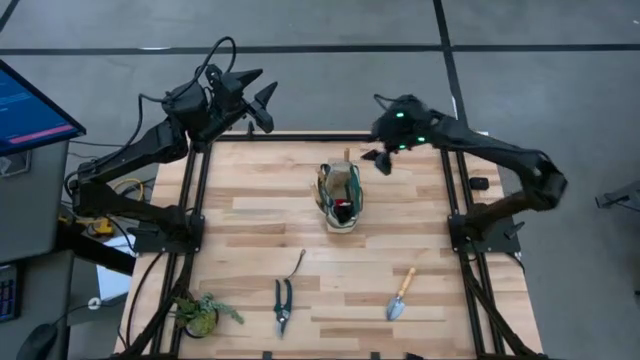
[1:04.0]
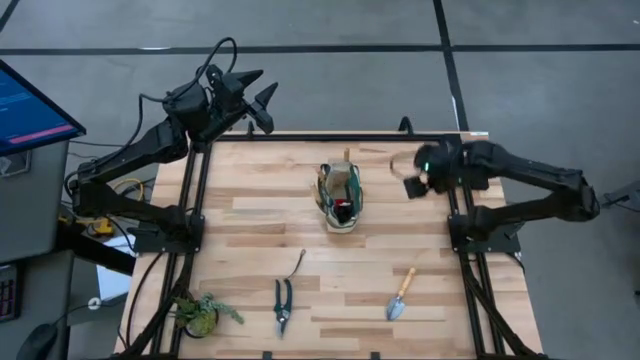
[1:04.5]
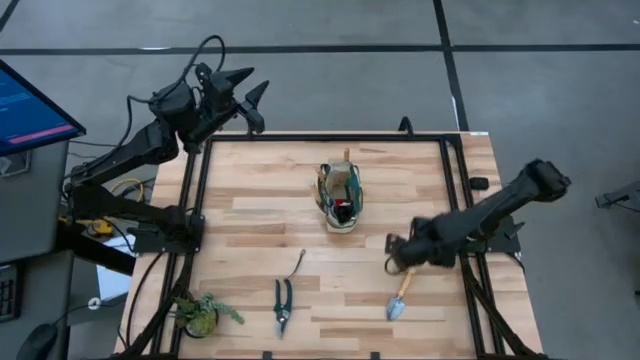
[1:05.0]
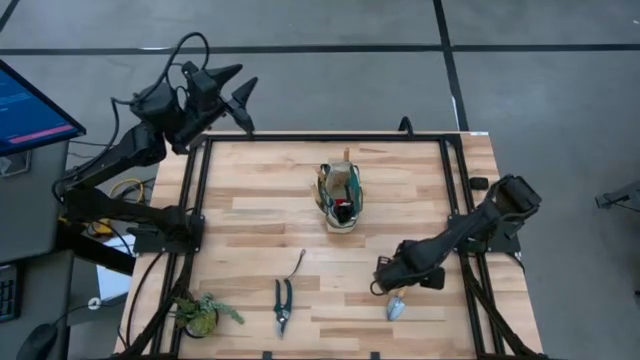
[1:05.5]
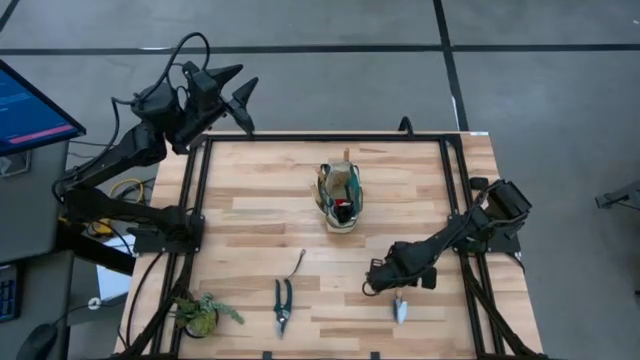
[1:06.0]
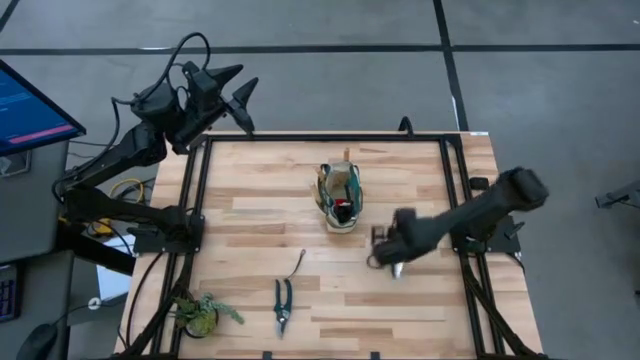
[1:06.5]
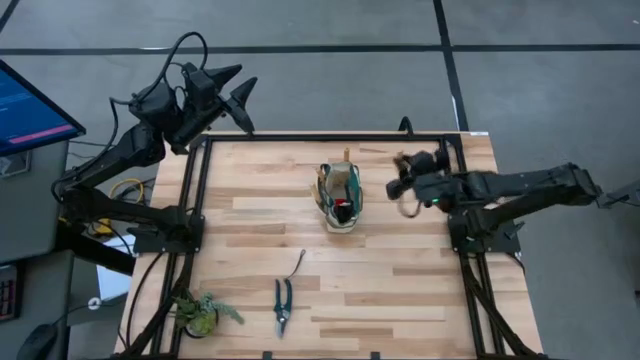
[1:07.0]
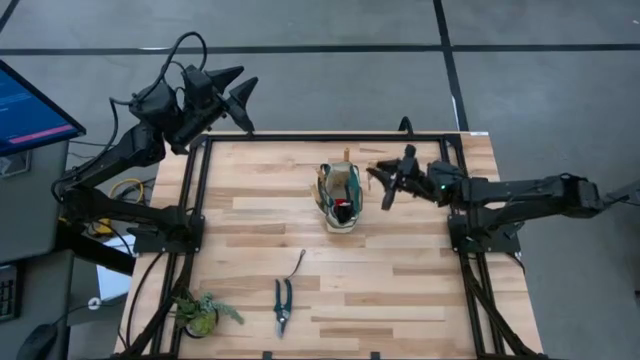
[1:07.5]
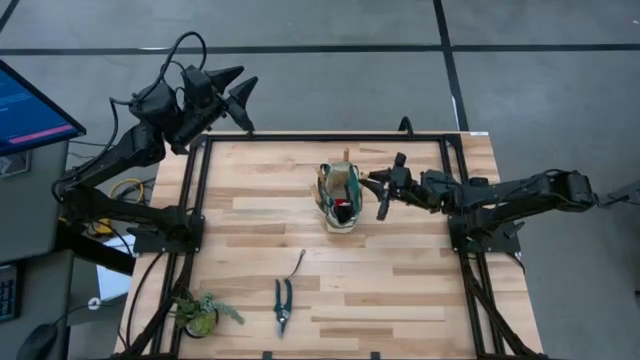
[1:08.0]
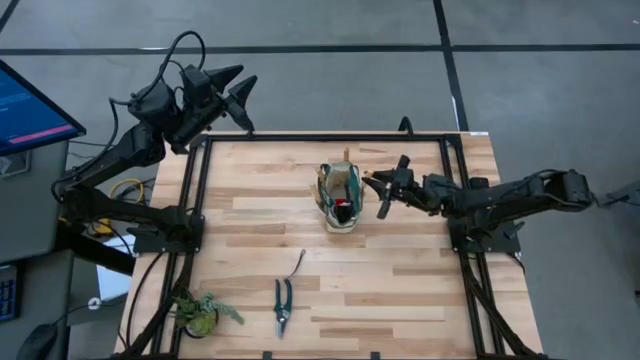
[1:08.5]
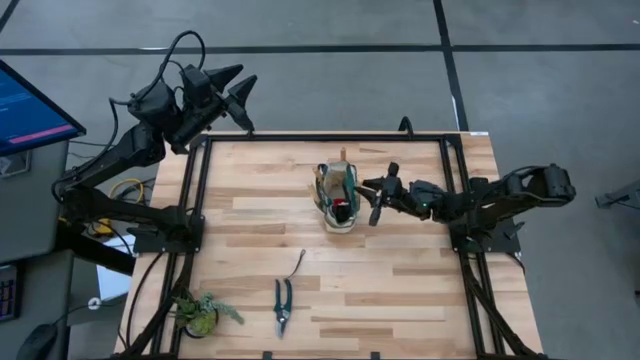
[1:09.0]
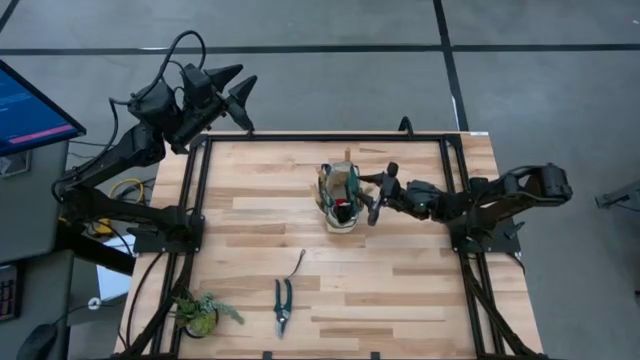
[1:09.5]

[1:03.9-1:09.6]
Task: Pick & Place Garden tools in Gardening bag
Put the brown trowel into the white gardening bag

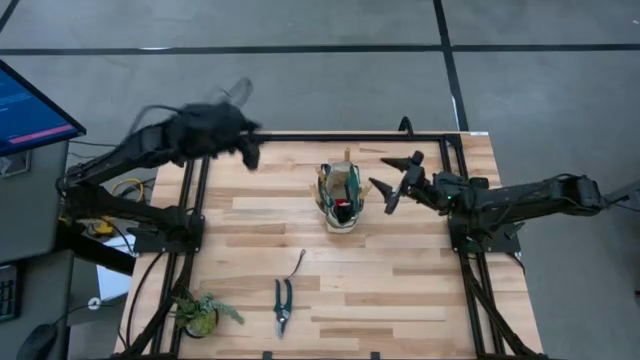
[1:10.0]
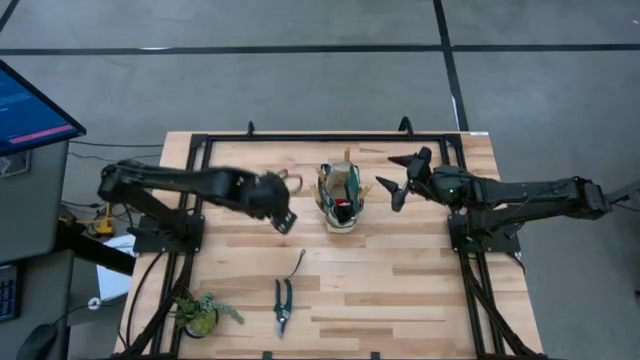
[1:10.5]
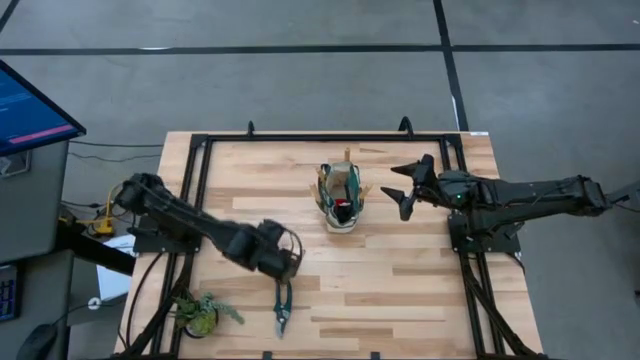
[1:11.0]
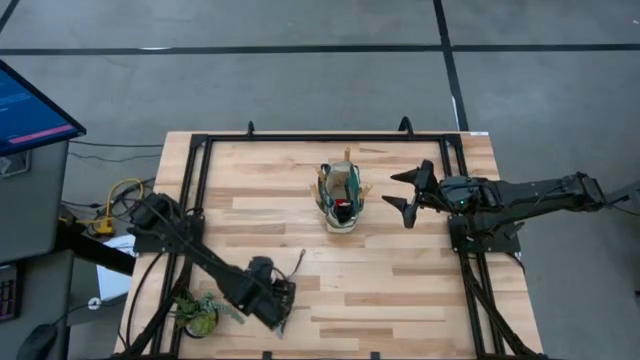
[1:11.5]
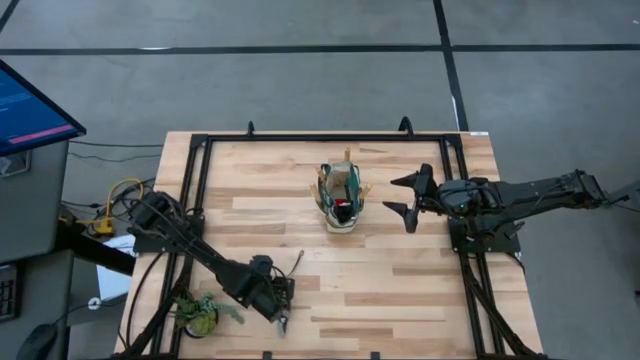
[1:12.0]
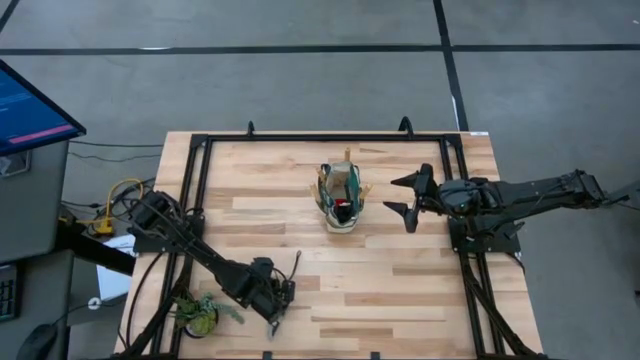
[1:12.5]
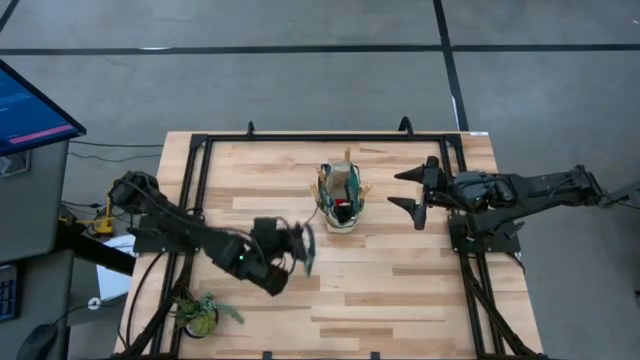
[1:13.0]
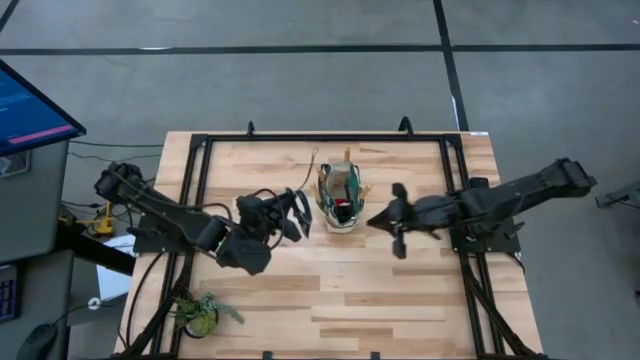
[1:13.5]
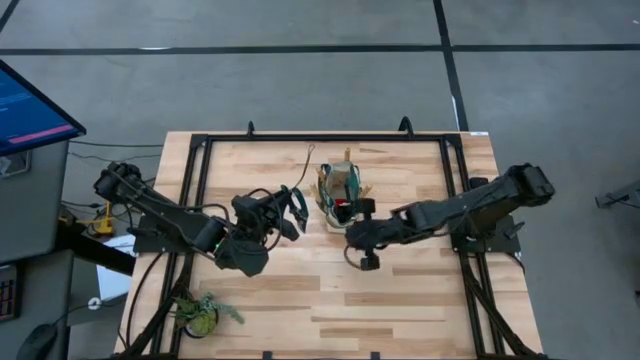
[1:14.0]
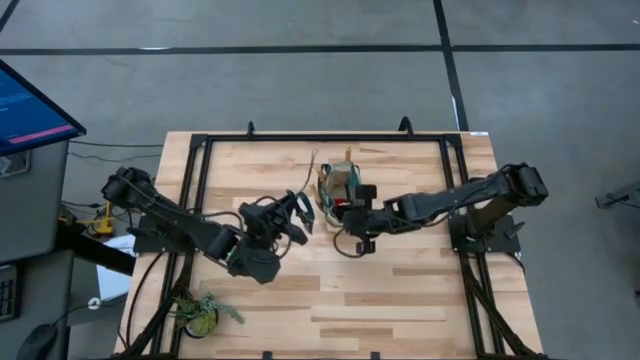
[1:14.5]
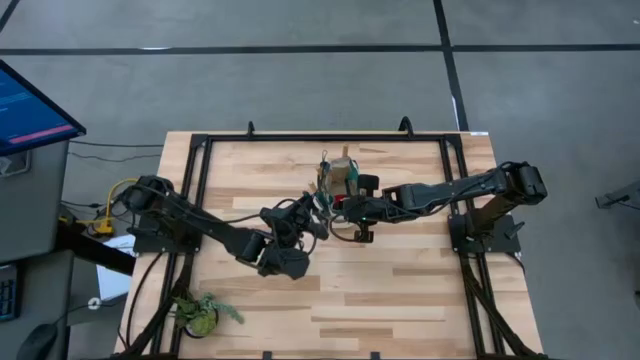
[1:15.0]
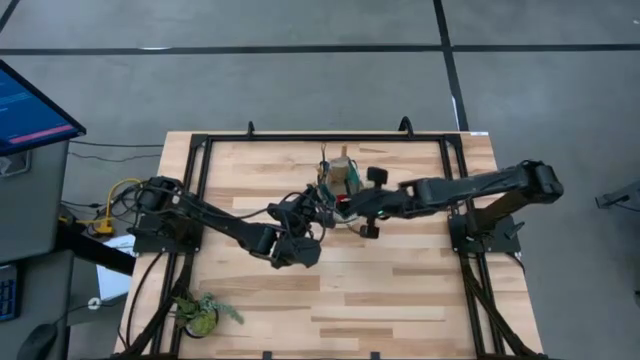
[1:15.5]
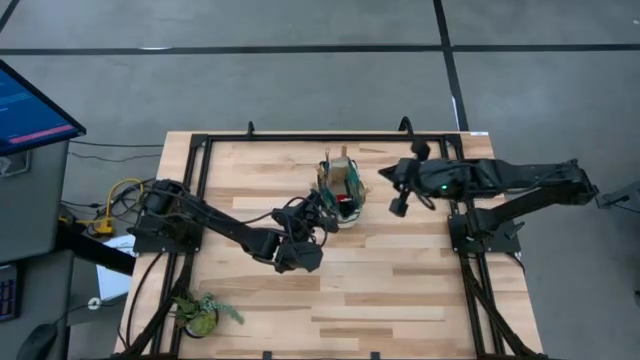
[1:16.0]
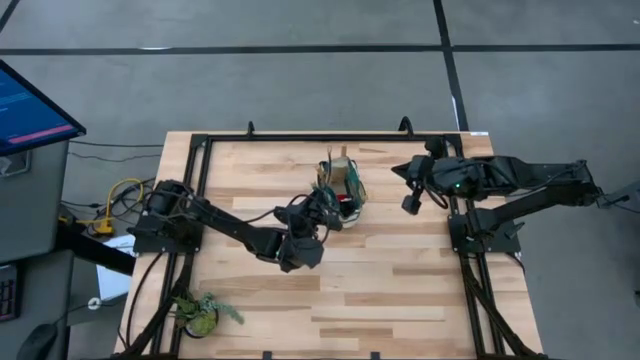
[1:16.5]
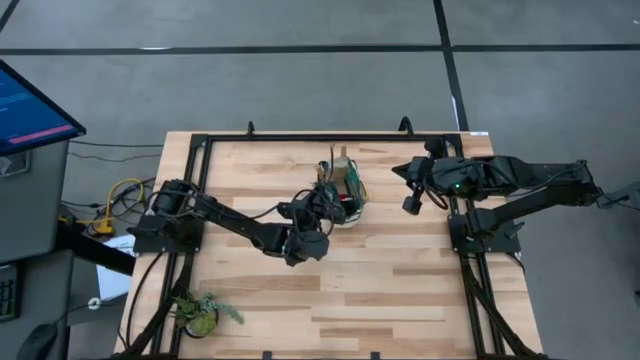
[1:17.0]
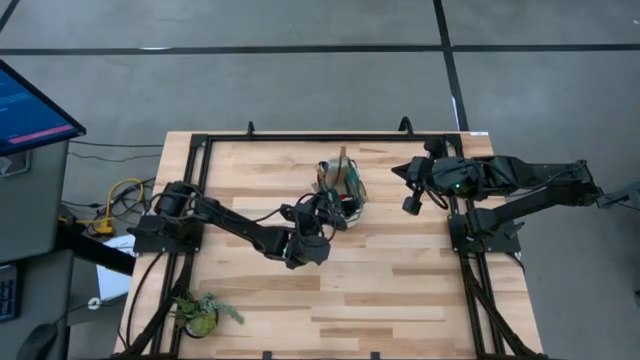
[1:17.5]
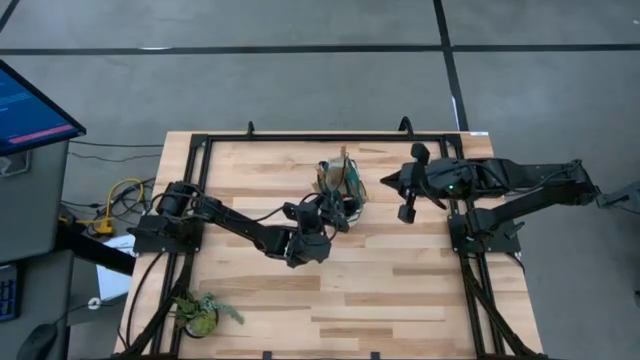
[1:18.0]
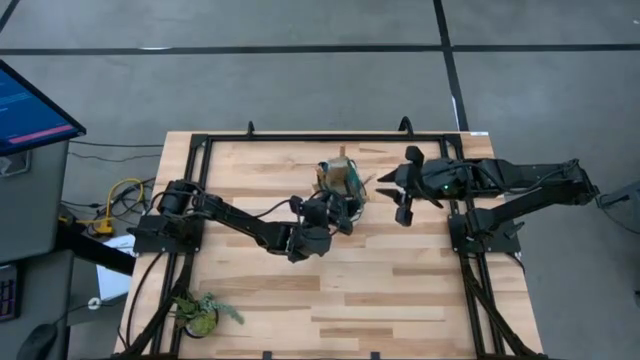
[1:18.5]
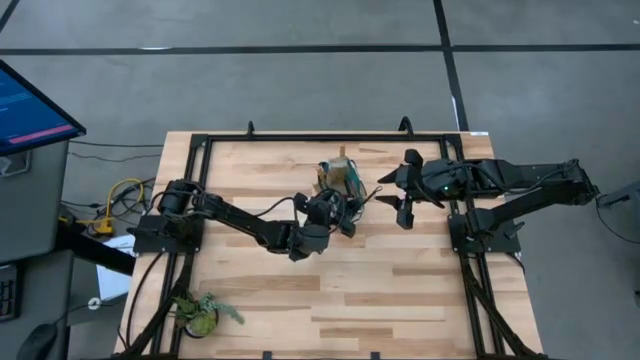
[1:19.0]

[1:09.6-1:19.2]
Put the green shear scissor into the white gardening bag

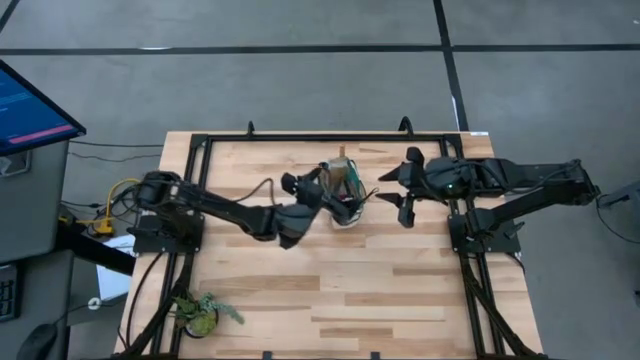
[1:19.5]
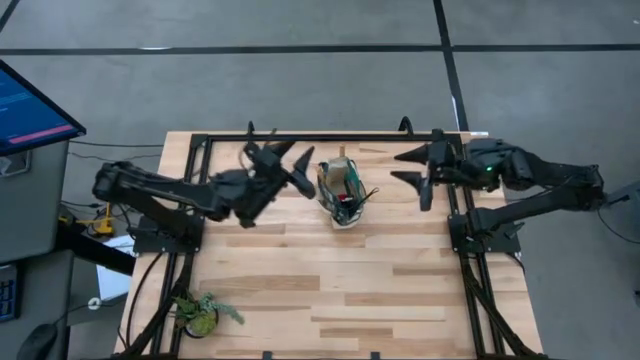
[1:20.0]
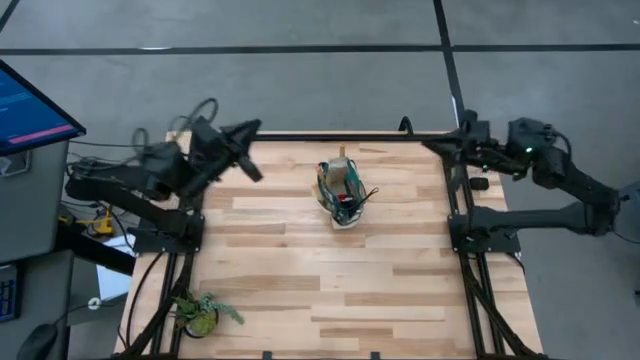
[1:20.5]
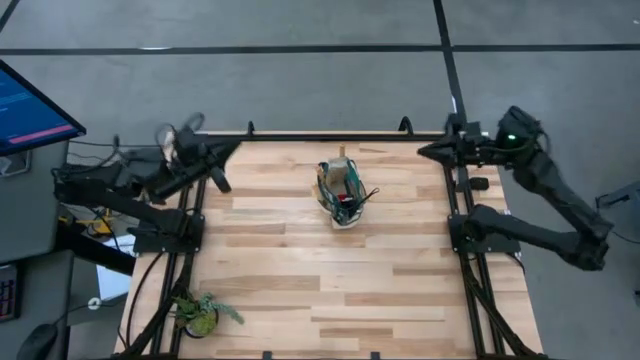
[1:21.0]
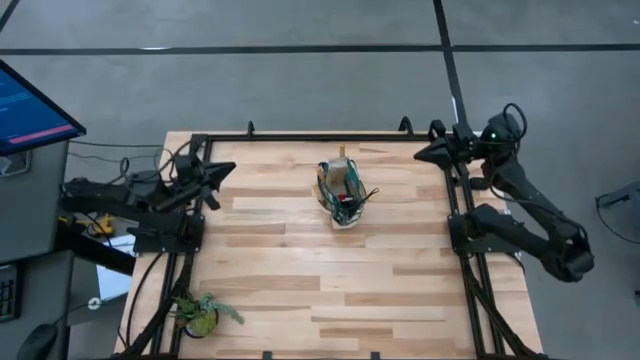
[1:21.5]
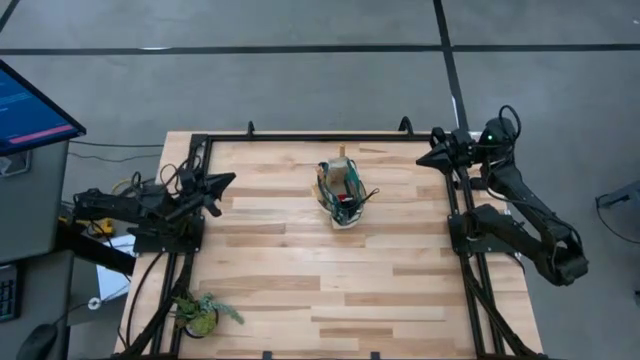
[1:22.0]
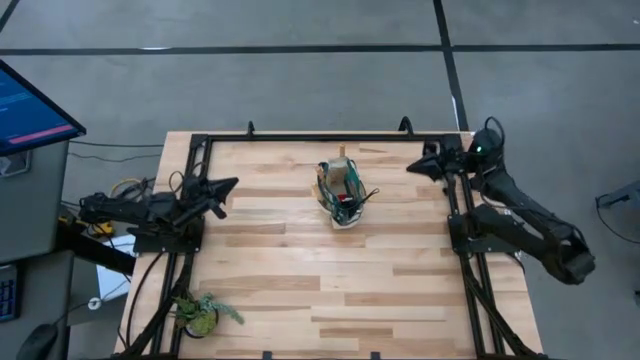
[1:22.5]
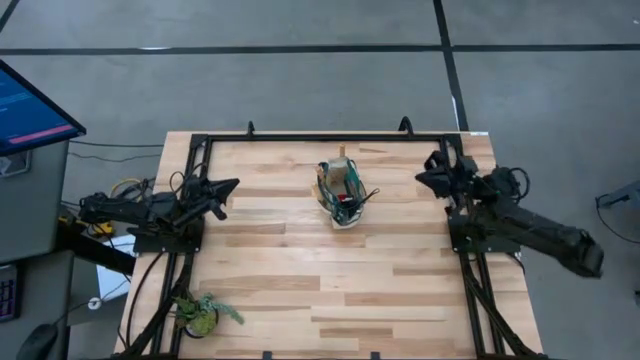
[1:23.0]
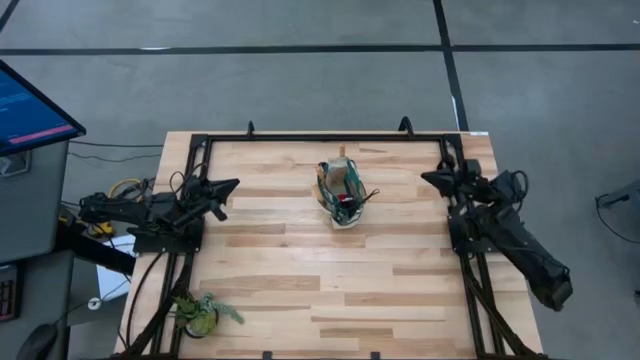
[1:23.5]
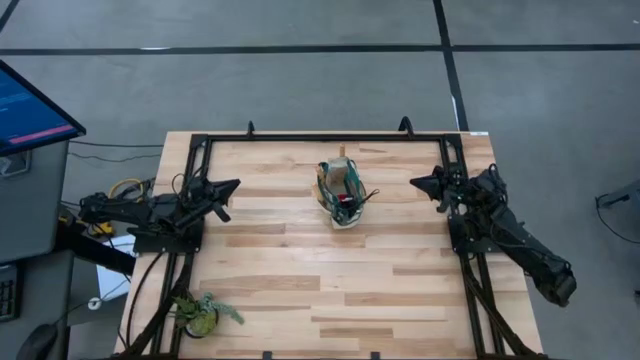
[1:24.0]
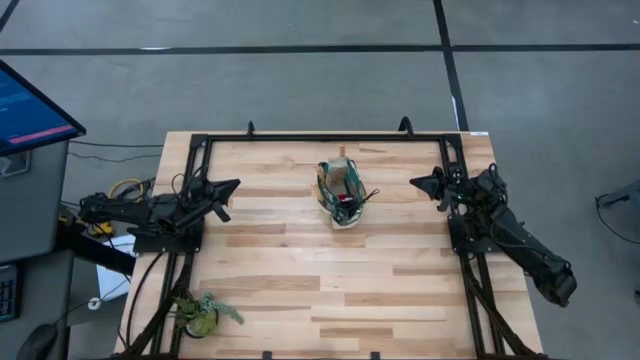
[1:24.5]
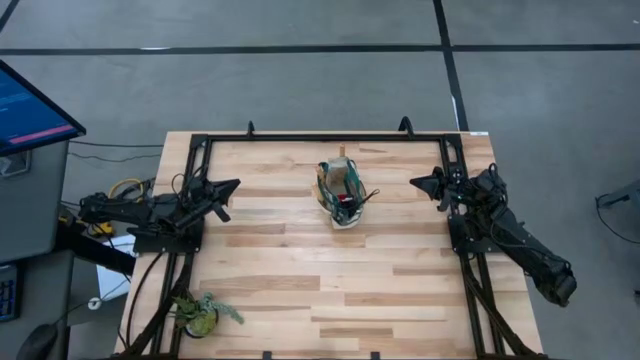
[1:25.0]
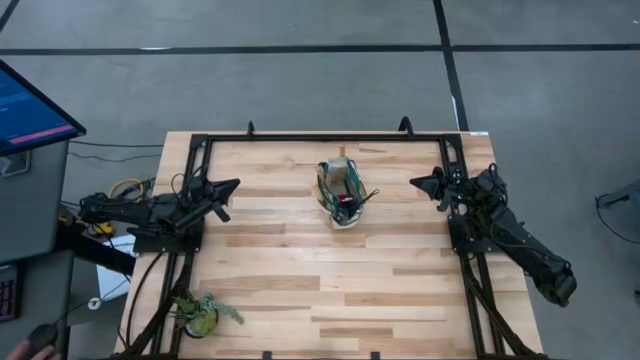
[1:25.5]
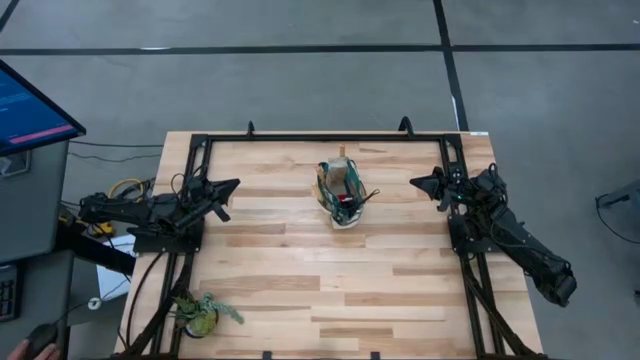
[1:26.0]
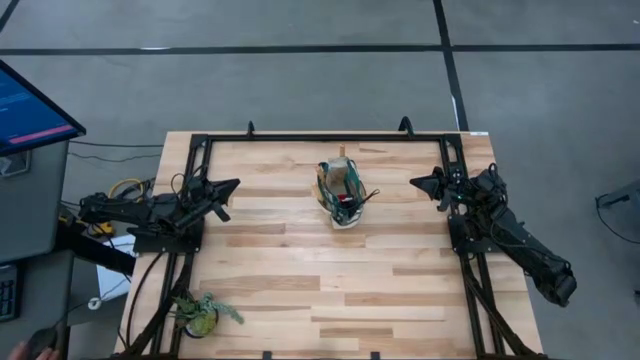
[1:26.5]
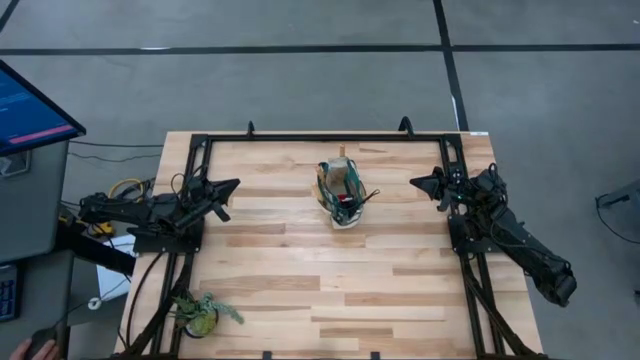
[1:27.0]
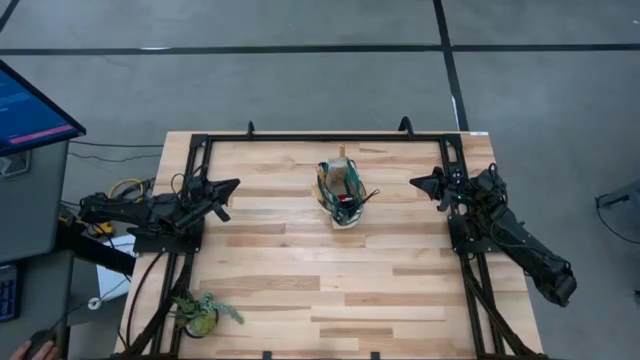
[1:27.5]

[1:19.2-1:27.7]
Return to Home Position
